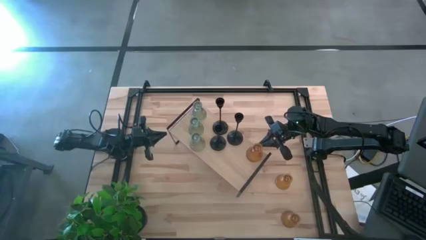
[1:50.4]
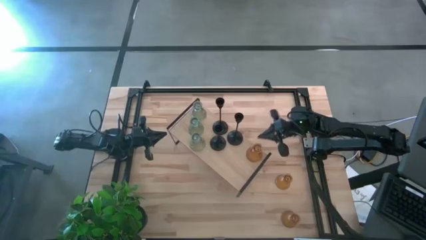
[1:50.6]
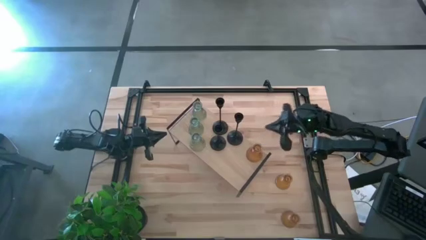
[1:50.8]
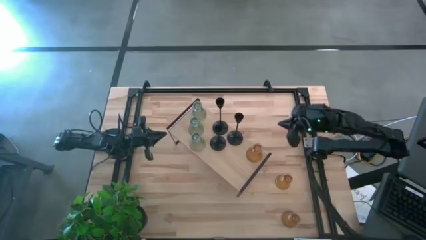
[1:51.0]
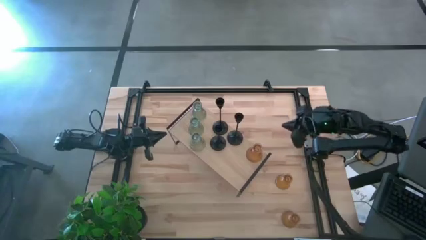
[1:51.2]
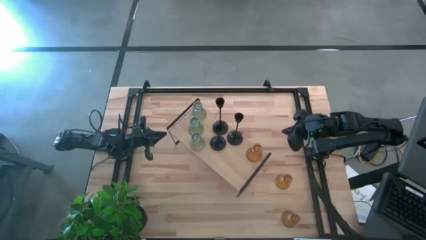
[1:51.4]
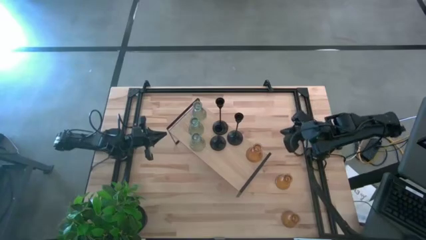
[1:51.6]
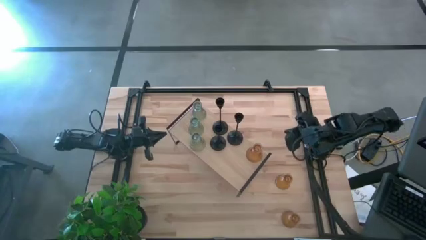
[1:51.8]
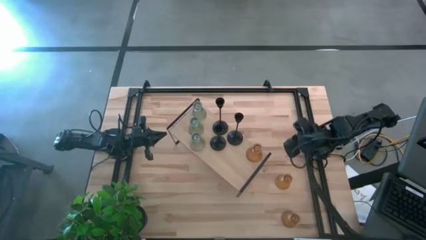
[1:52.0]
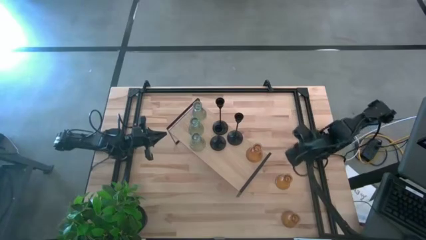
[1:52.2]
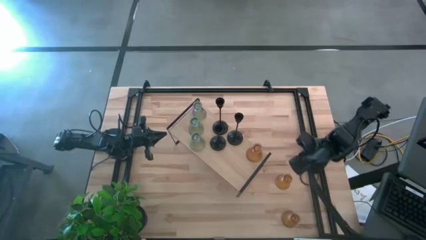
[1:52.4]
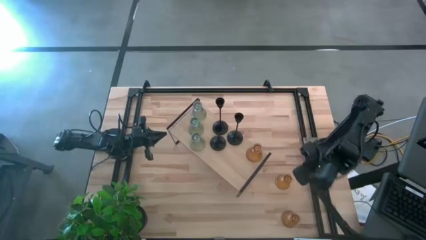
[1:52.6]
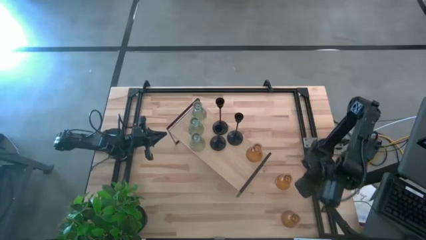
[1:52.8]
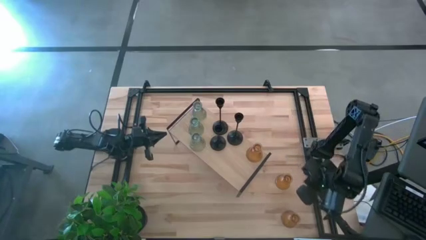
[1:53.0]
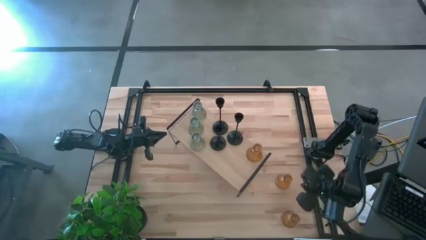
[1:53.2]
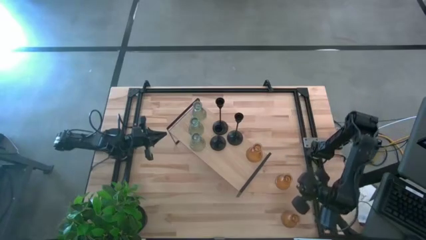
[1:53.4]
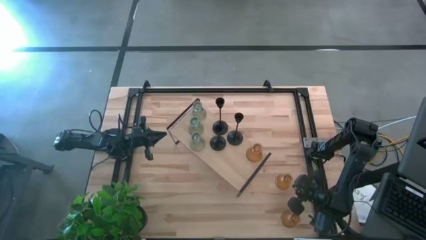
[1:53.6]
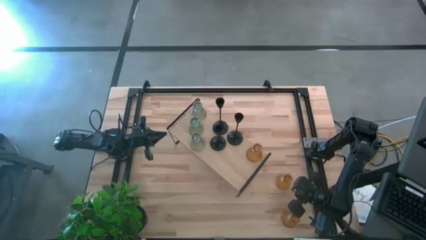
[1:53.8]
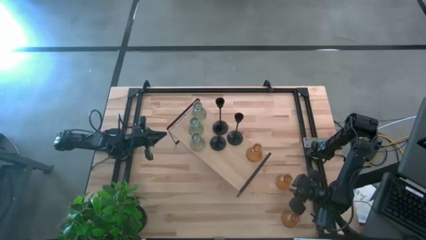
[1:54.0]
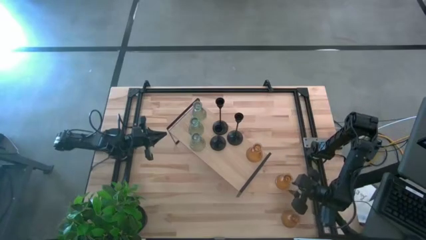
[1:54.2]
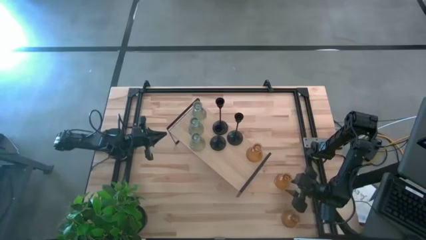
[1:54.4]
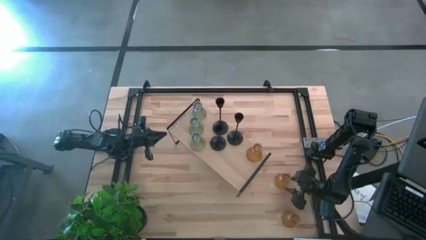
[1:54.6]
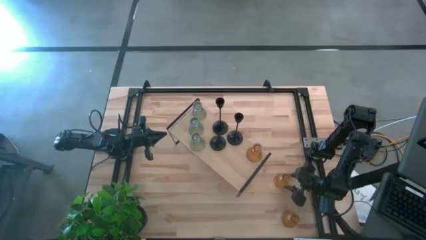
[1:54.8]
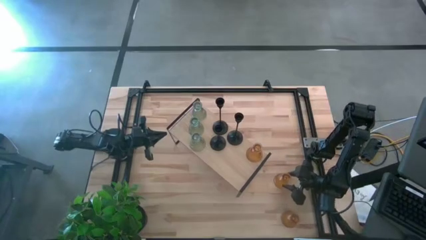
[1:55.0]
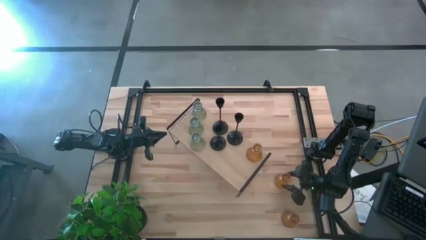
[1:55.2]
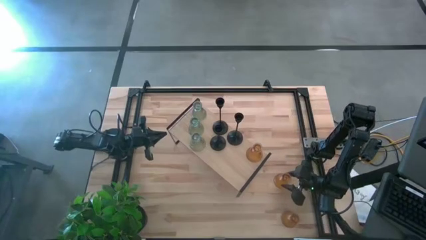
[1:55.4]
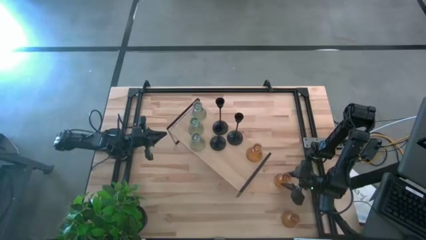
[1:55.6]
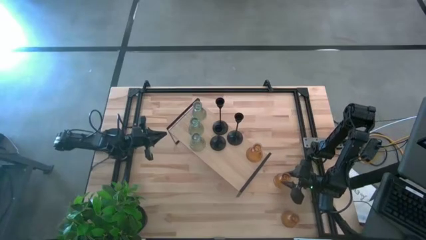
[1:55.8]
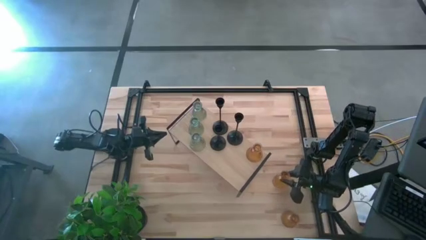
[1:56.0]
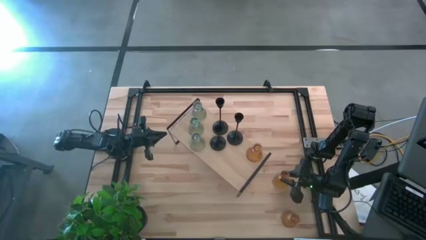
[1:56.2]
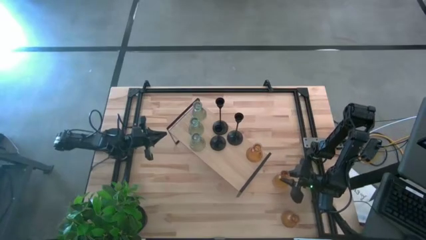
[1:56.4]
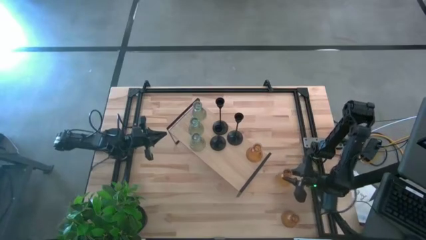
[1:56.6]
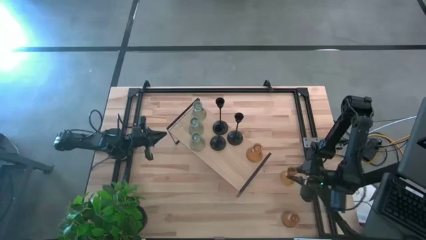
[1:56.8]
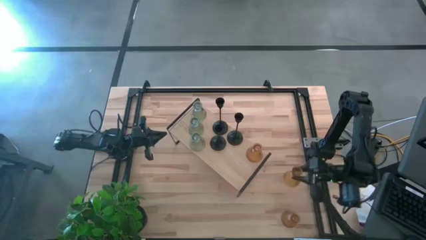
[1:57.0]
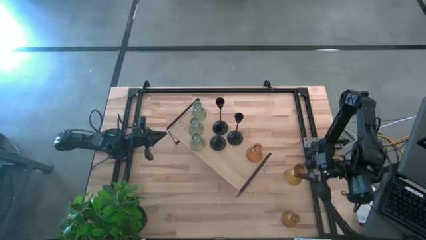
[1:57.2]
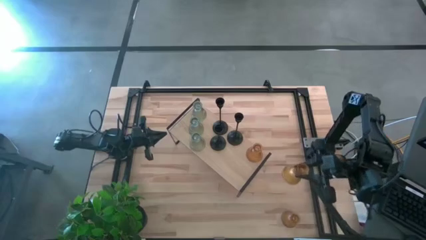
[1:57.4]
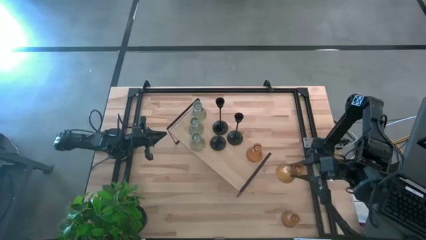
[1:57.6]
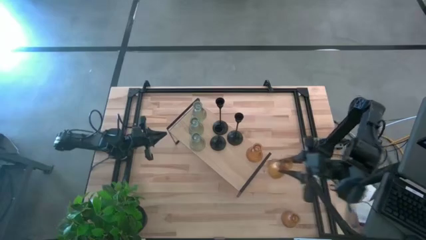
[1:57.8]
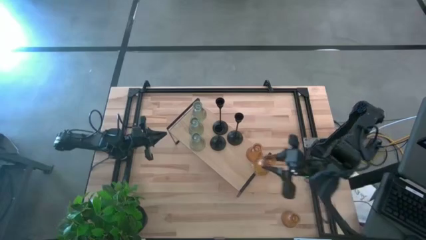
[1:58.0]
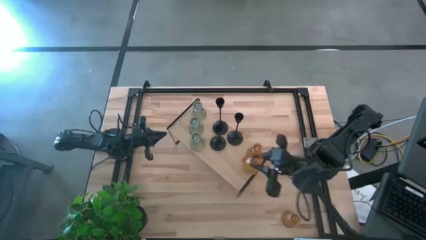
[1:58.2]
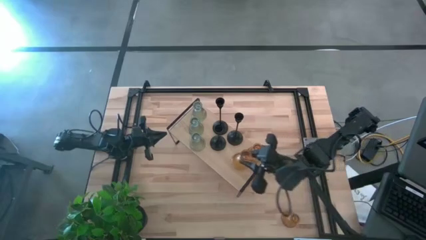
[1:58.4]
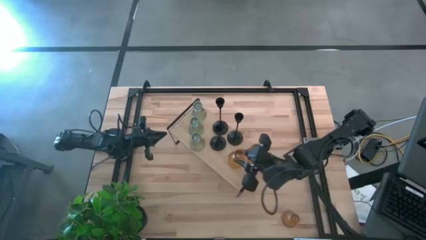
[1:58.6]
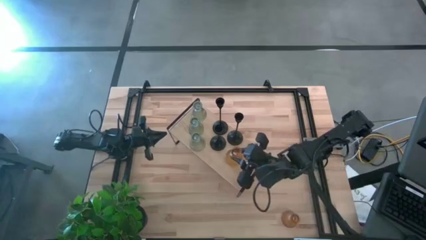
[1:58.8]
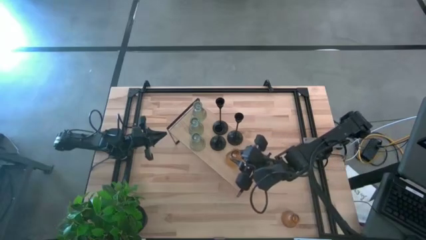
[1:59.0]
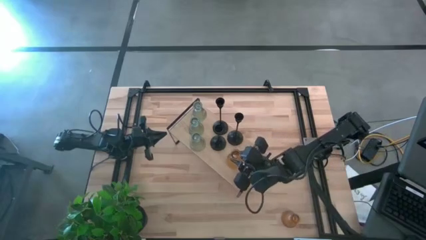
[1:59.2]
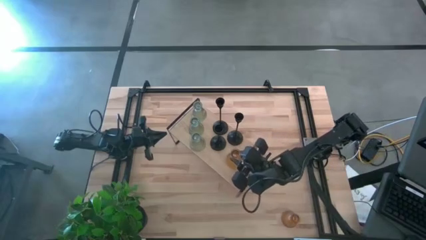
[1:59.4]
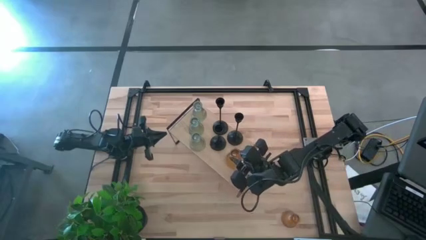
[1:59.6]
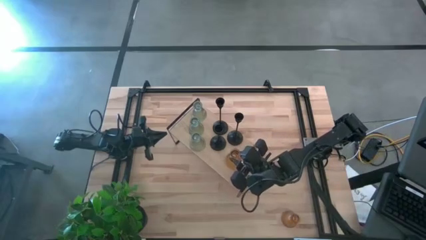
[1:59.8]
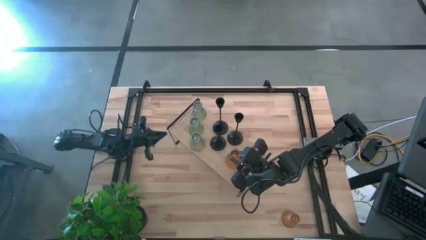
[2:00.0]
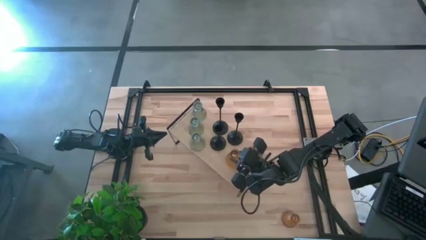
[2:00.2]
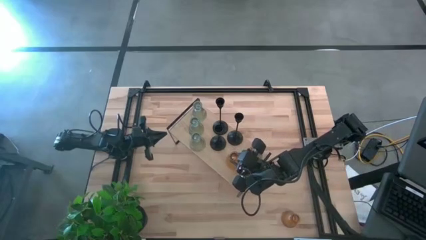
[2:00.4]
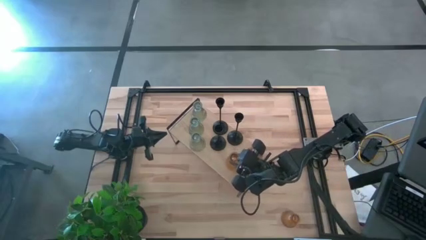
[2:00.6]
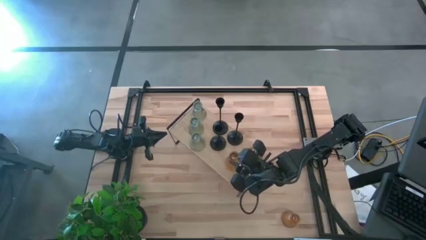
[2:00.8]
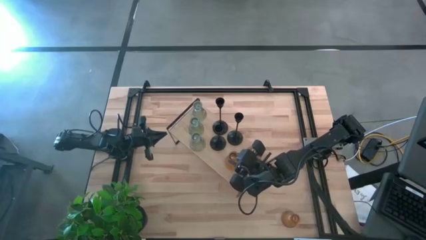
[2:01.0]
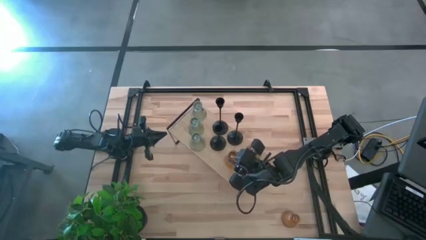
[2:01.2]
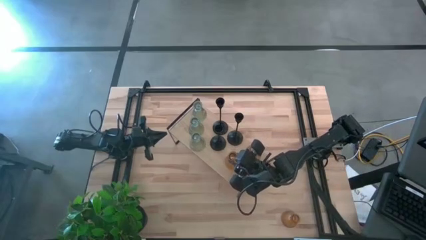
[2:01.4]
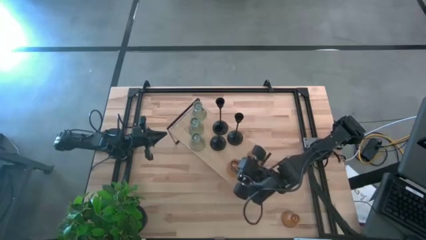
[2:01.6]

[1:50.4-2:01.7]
Task: Pick & Place candle stick holders
Put the top orange candle holder on the shelf

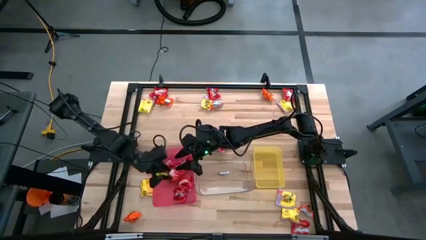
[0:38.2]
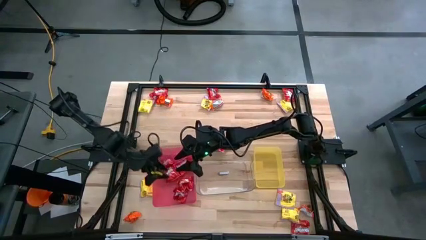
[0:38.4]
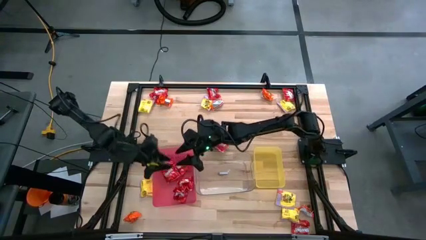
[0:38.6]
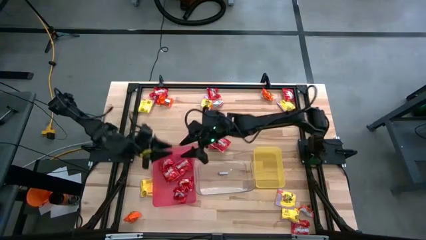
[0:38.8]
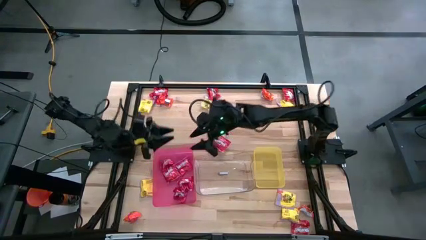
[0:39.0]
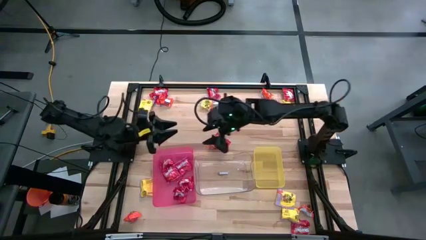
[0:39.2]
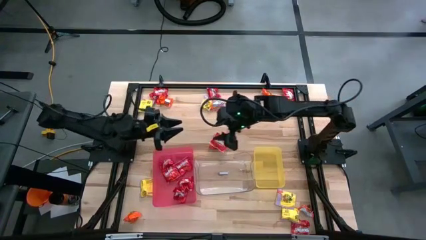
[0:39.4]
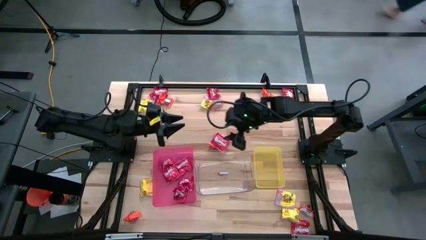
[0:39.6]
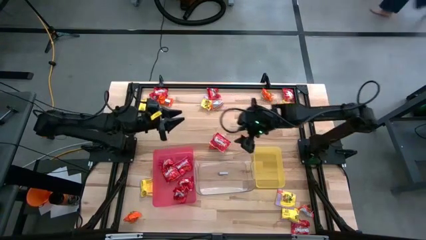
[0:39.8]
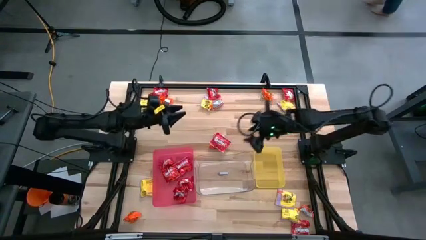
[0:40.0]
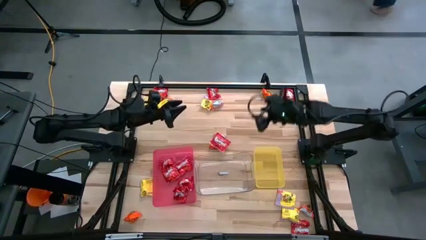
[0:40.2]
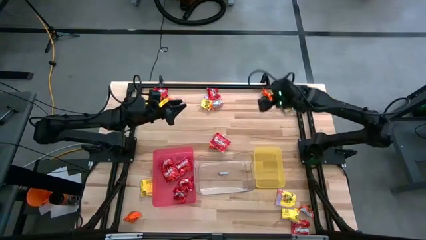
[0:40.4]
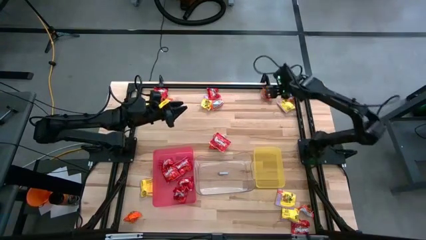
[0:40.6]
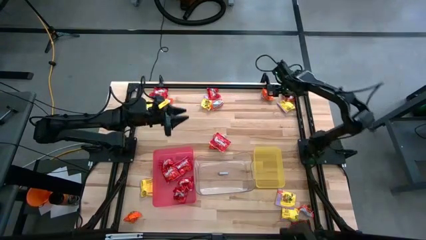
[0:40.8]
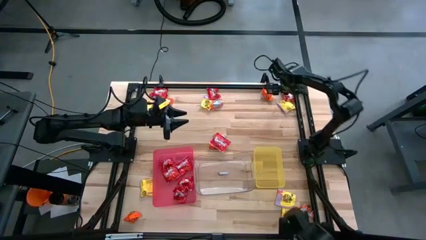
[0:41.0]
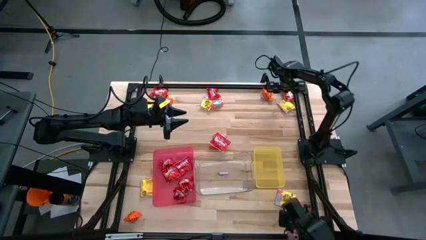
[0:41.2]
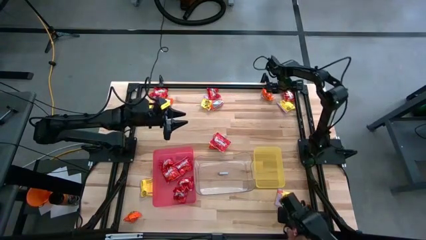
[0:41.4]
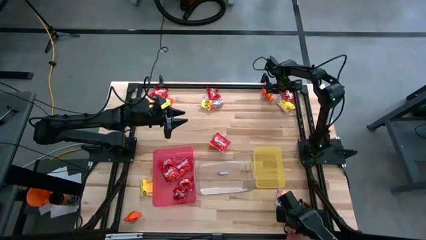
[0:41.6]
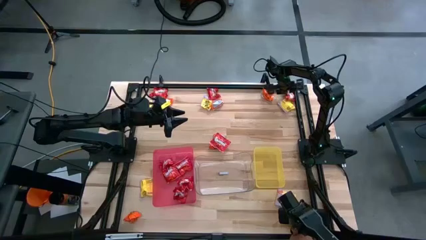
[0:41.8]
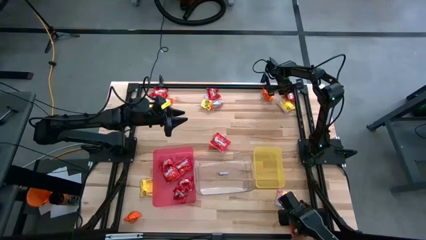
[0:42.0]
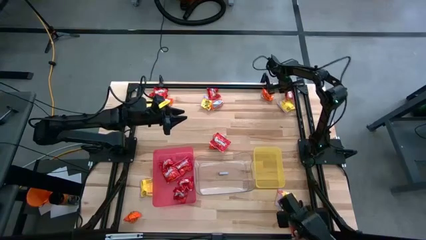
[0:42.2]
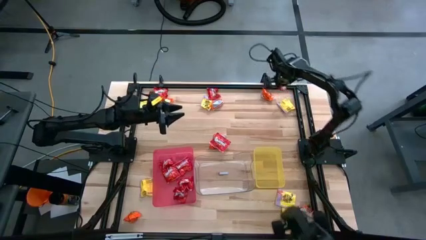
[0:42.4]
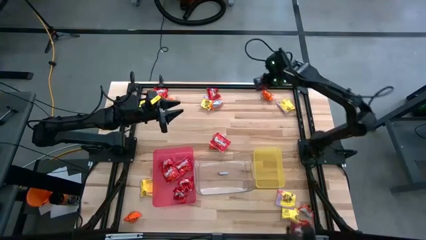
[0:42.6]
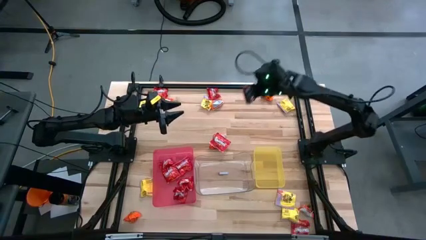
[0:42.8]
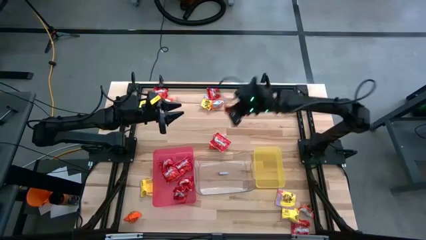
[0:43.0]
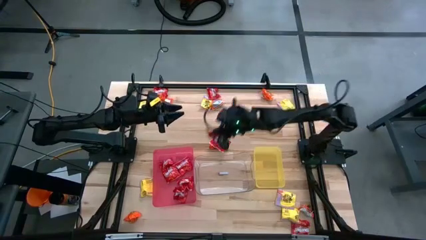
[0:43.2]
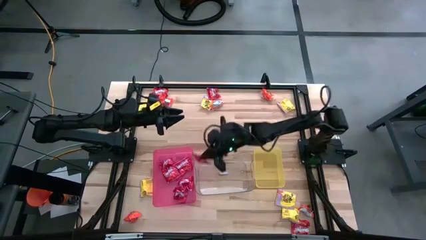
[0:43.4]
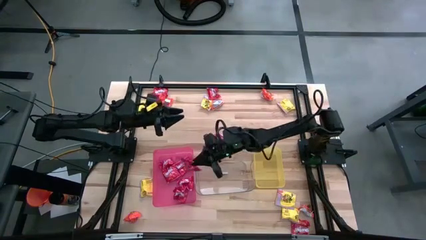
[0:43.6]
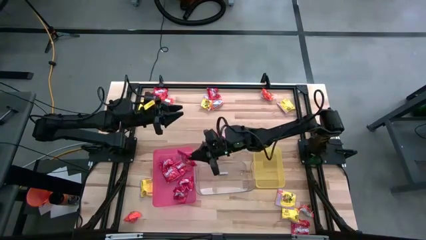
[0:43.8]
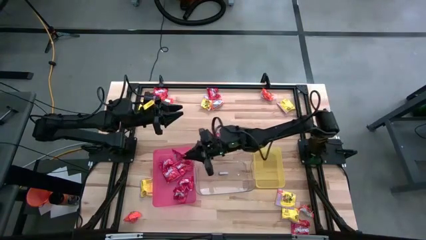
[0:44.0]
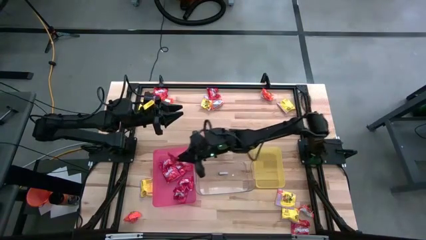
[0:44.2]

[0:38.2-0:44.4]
Task: Sort candy
Put the red candy into the red bin
